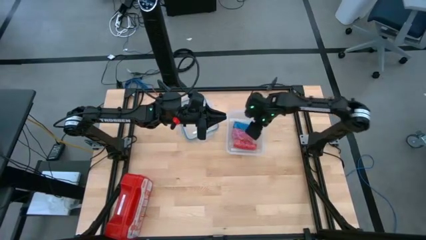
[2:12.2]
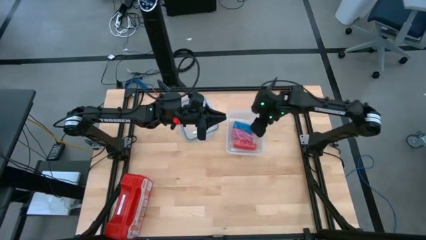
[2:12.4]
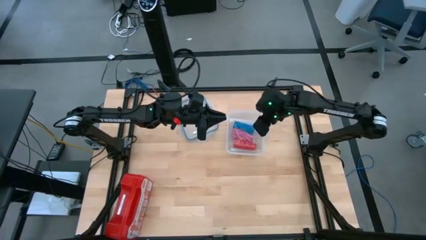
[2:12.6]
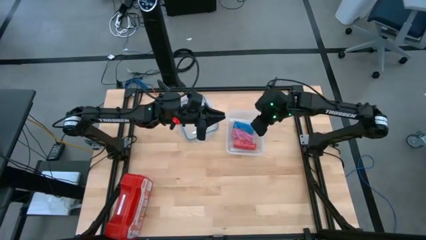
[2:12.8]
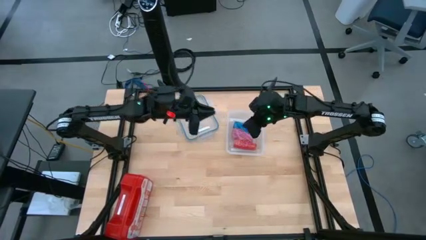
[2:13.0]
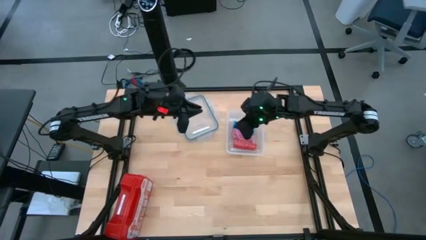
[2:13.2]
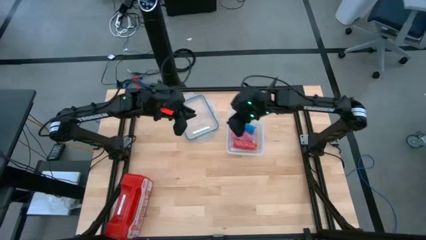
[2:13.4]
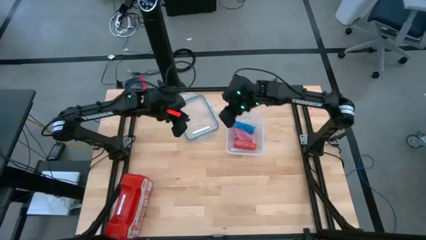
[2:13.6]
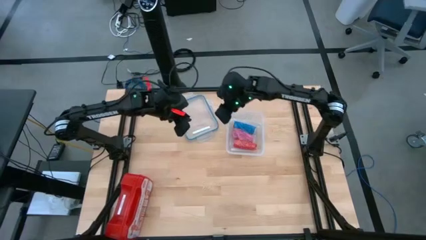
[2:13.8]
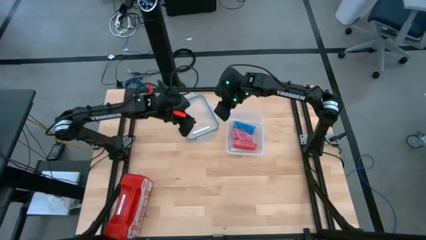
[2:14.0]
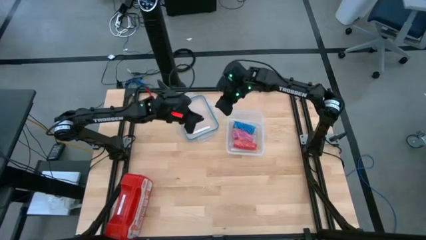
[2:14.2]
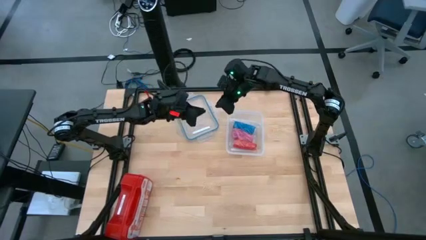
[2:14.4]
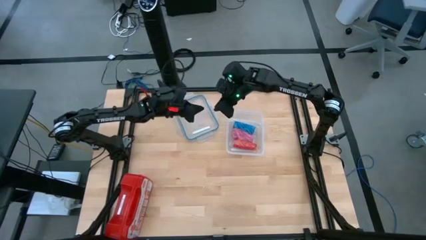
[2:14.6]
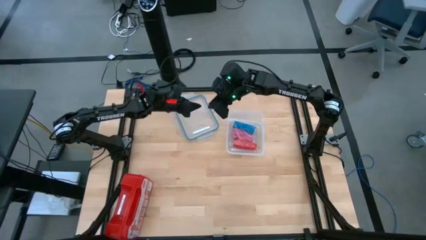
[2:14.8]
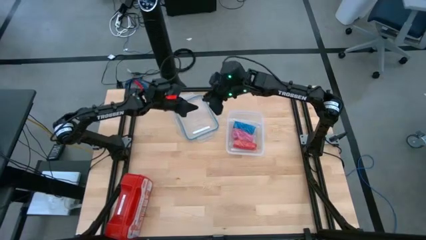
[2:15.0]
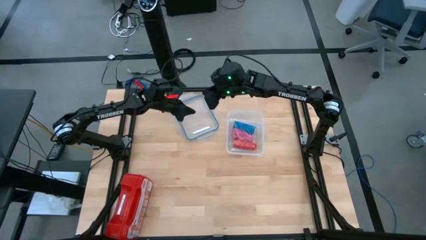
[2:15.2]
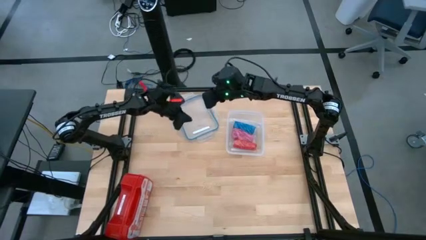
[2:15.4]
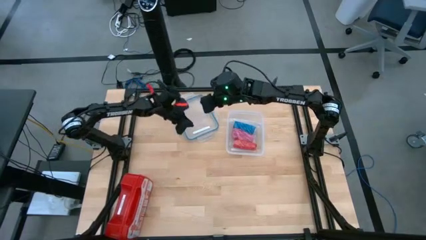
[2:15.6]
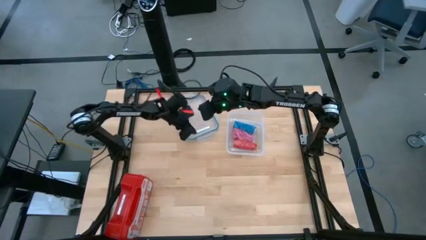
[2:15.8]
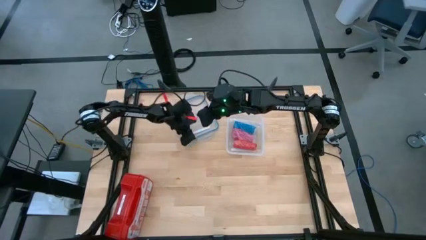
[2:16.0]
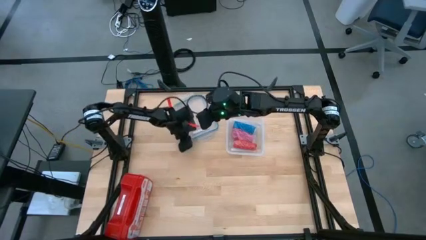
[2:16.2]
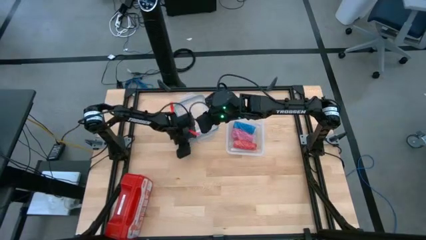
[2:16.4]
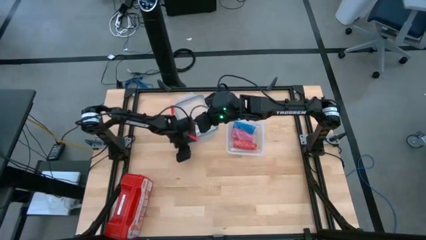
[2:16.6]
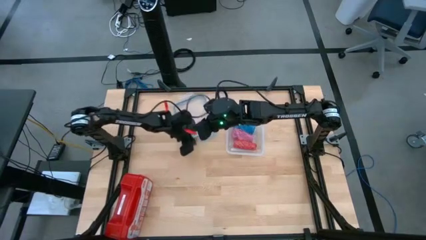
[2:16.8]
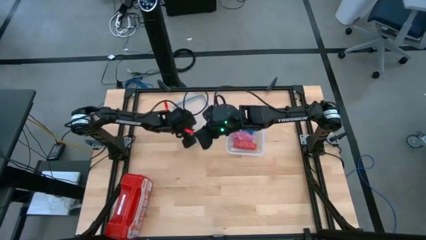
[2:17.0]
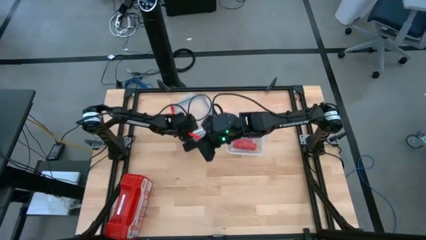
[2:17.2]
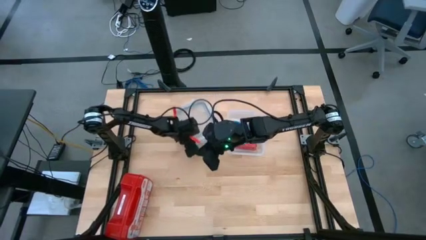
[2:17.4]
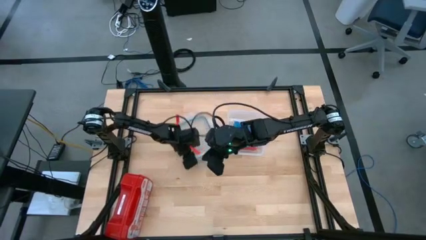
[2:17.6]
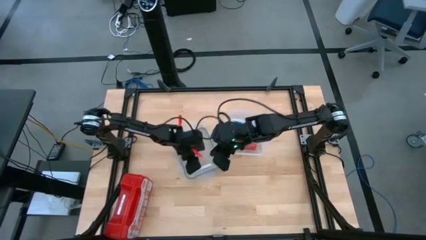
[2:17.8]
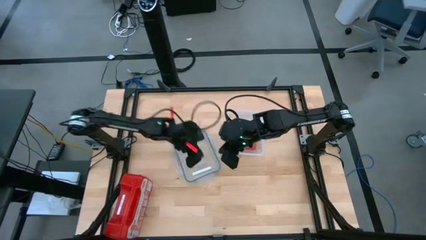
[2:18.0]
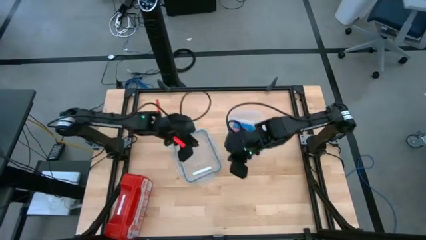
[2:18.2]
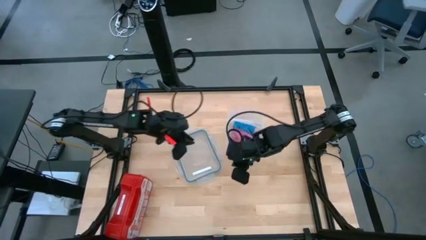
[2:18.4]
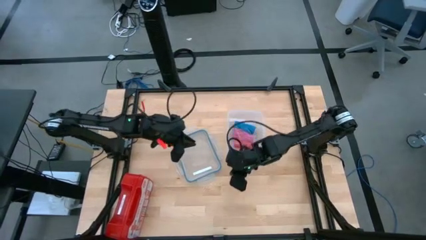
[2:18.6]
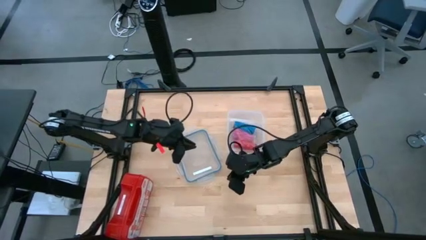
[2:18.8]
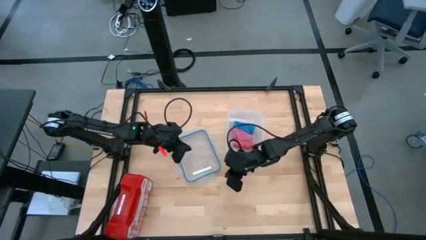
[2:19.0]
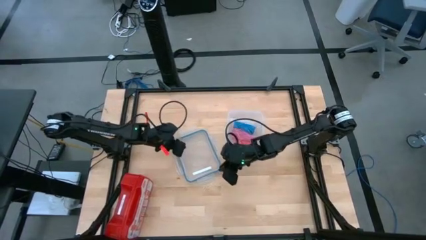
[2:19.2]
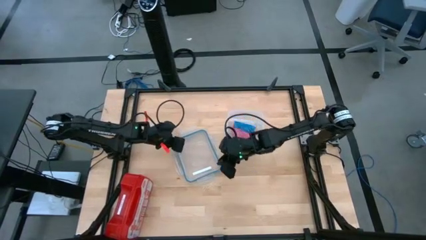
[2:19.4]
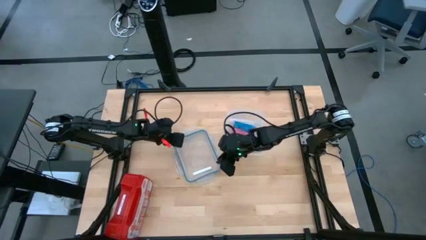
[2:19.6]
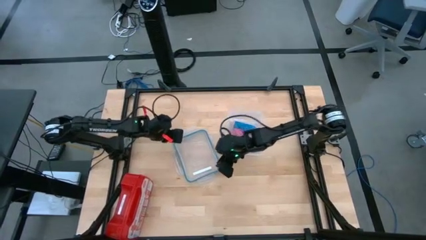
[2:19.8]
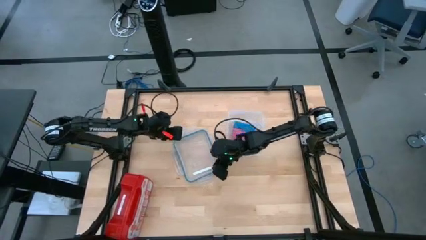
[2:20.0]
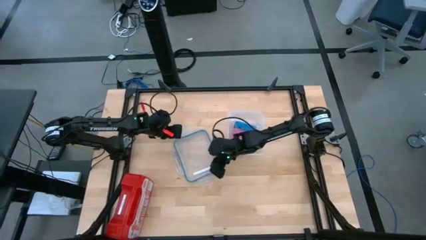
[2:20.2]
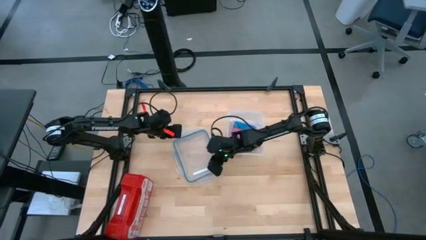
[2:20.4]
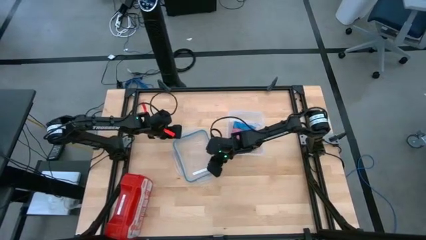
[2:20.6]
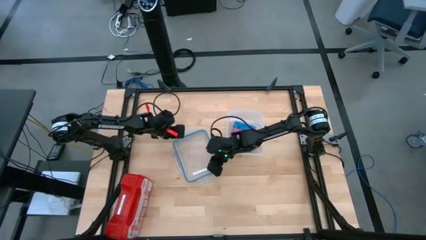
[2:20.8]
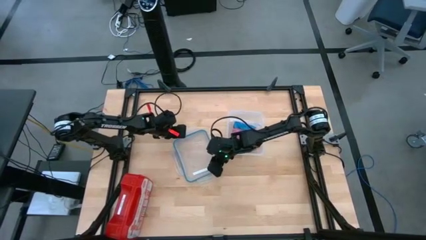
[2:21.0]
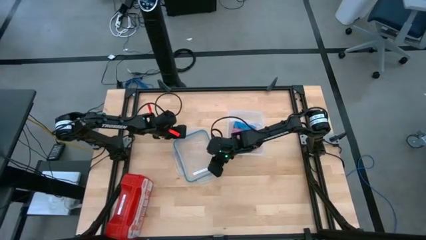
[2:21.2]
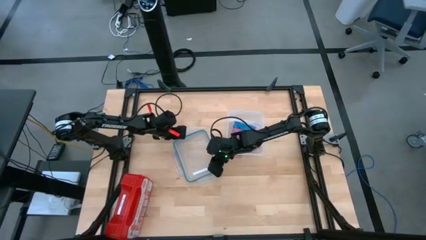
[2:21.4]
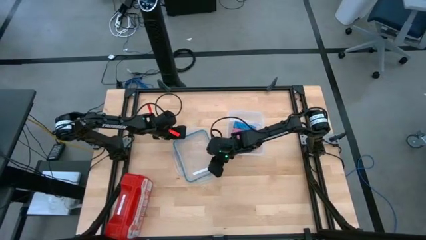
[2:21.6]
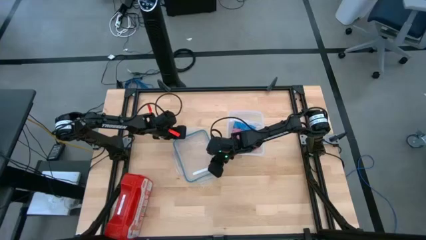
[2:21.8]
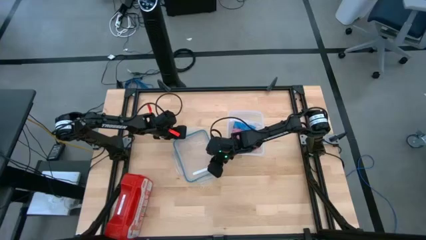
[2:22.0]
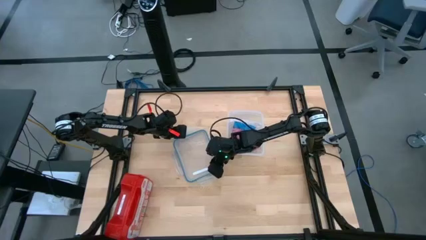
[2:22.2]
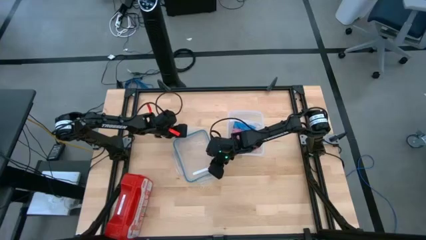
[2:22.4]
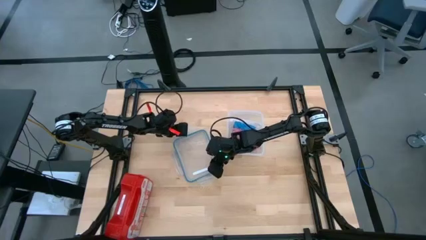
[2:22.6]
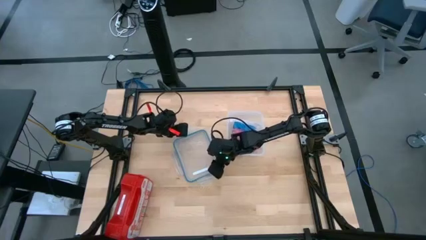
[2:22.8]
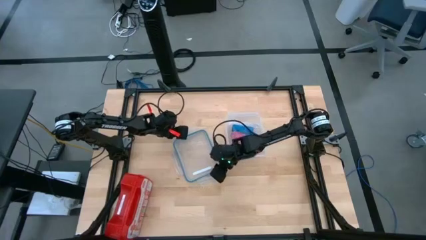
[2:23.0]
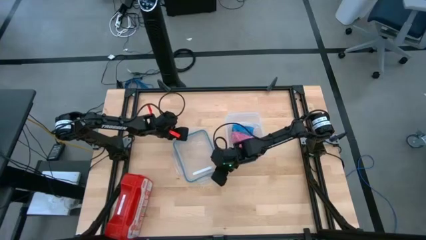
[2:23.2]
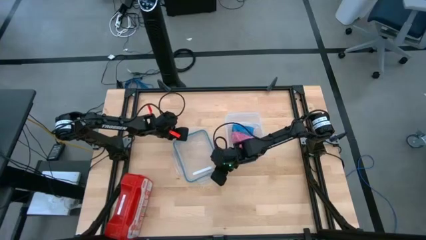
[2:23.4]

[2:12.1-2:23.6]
Task: Roll bandage
Close the lid of the tupperware

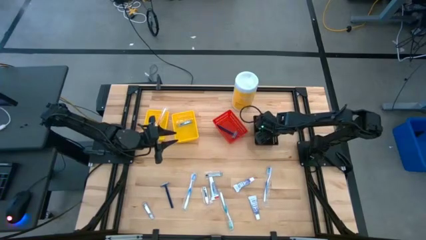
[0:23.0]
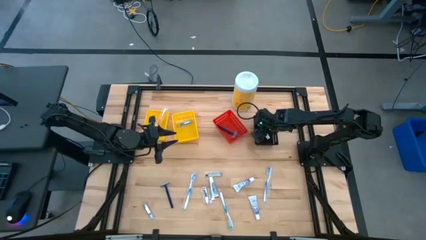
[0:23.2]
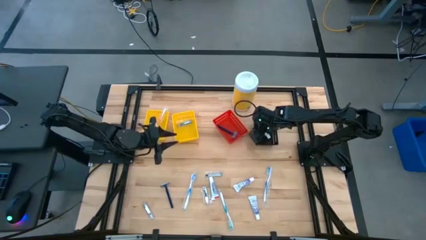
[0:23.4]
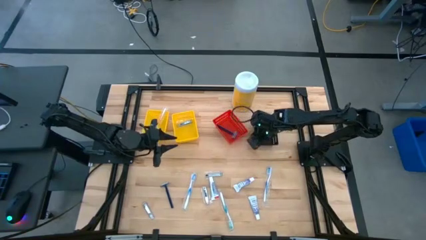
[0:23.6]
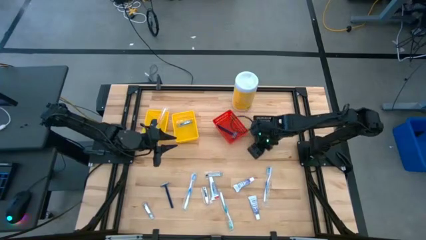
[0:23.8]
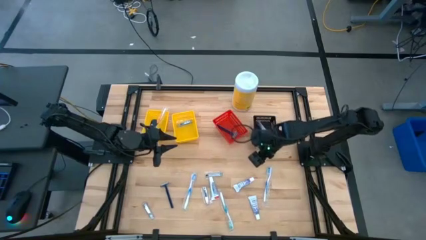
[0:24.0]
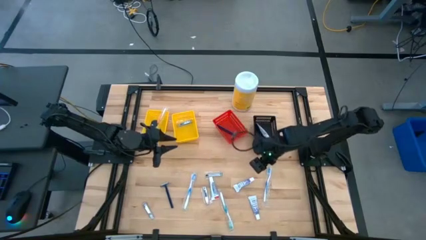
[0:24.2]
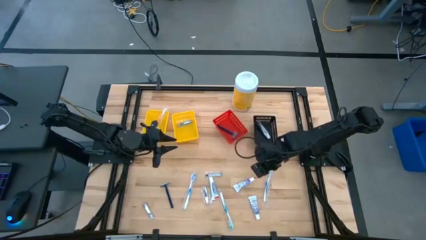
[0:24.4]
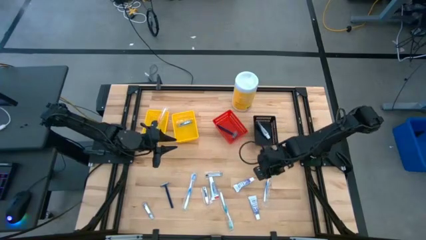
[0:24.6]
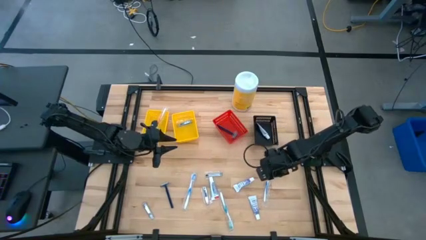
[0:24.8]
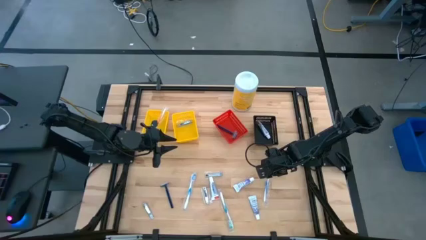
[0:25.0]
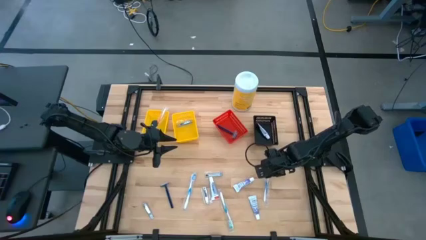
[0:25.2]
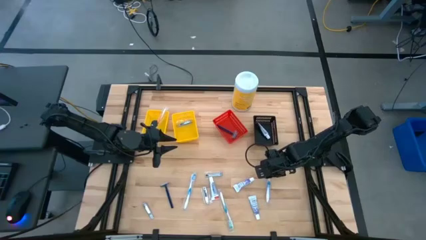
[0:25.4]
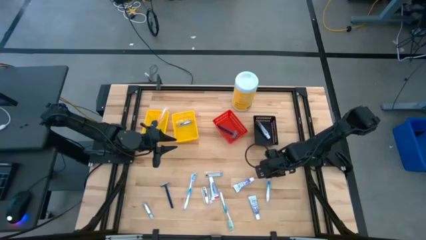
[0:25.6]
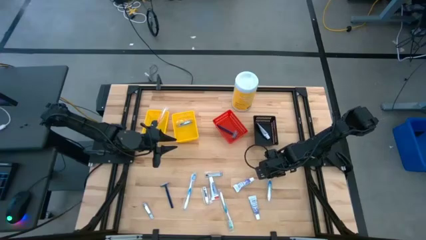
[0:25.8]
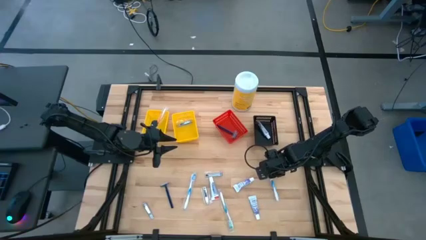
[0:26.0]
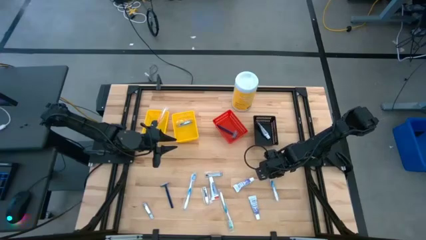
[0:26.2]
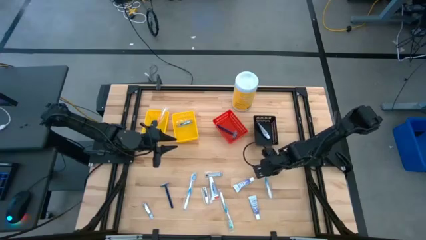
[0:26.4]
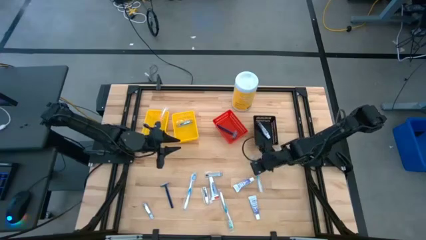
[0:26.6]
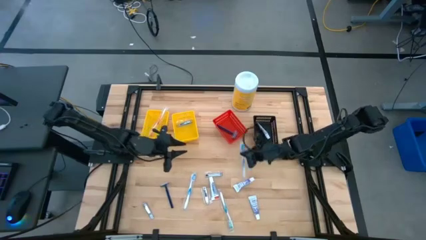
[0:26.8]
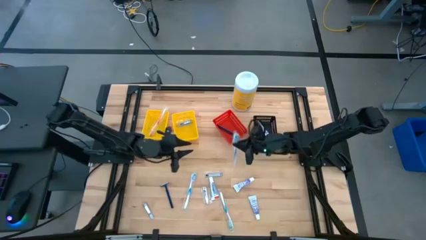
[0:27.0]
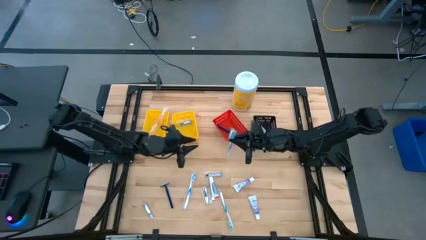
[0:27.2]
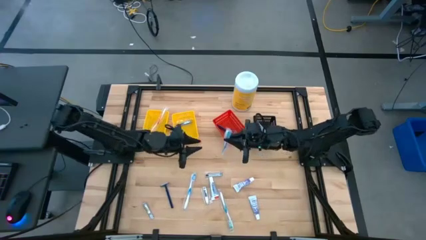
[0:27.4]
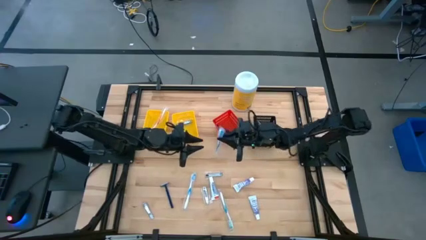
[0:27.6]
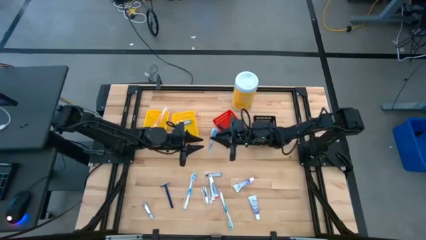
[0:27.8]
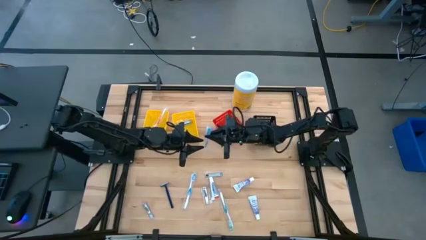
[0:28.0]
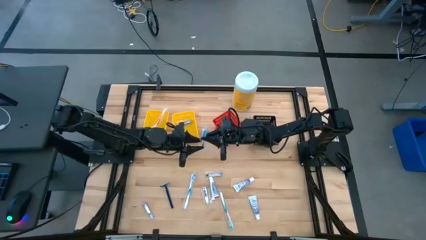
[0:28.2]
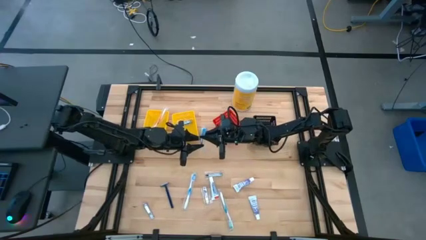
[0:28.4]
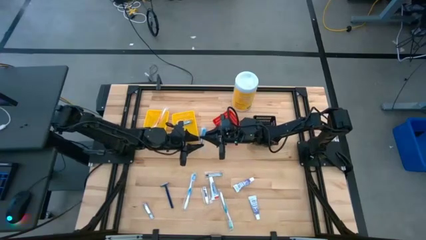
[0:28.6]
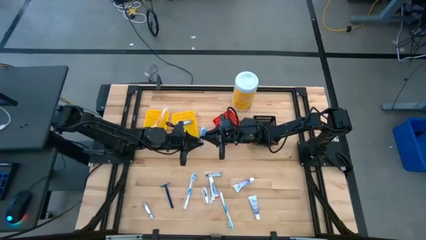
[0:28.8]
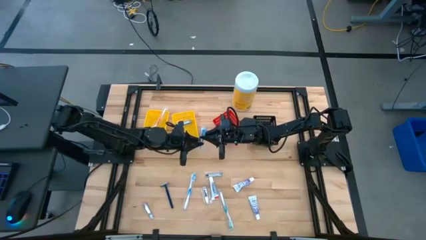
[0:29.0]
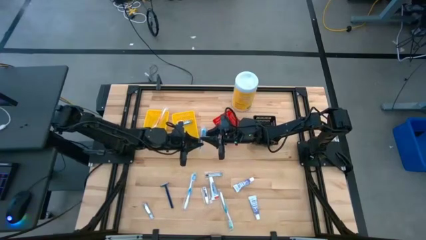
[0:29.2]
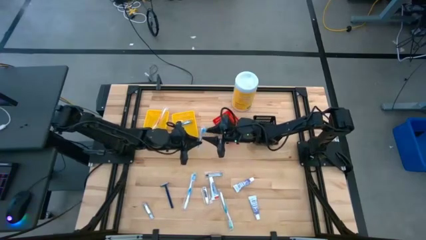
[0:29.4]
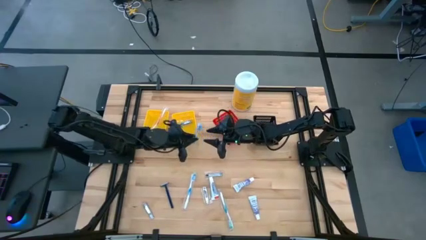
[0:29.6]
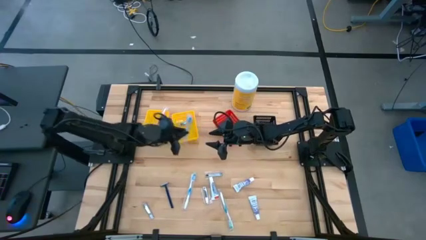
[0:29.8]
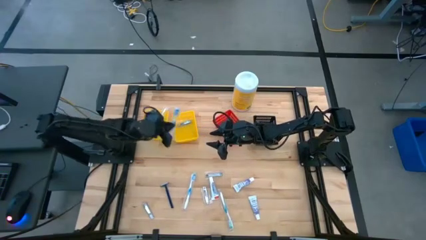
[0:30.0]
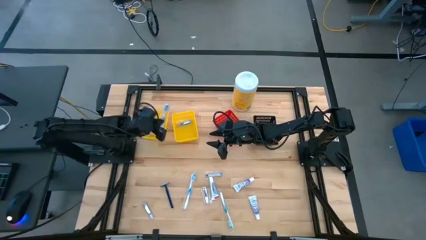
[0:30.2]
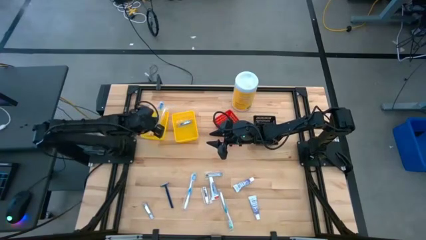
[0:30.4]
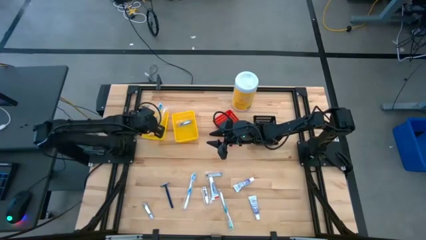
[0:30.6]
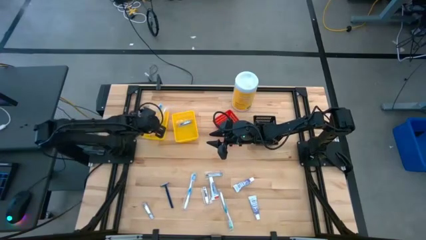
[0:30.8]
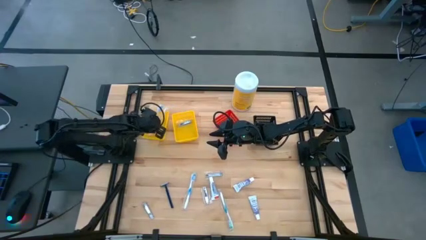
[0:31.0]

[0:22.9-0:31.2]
Task: Pick & Place Travel size toiletries
Put the blue toothbrush into the left yellow bin
